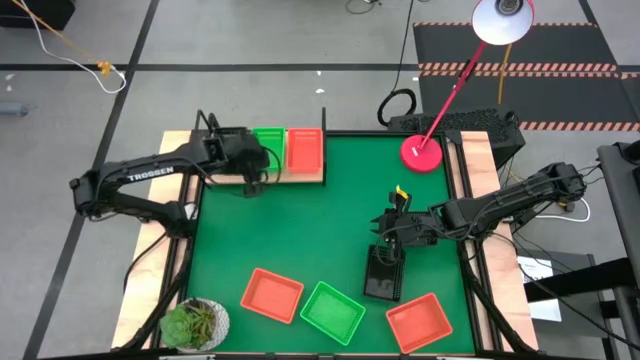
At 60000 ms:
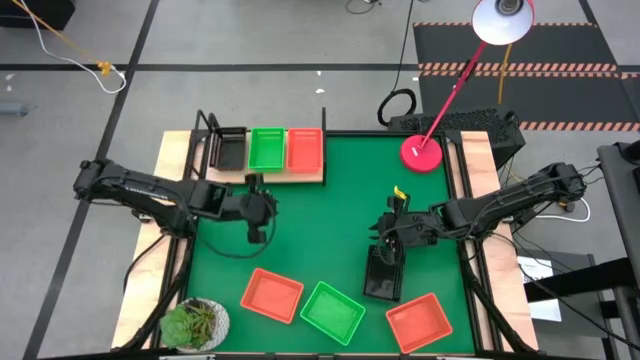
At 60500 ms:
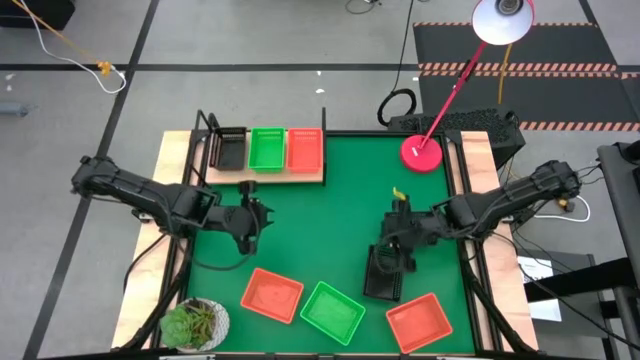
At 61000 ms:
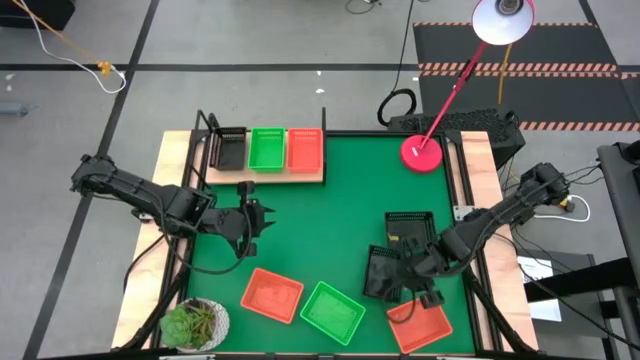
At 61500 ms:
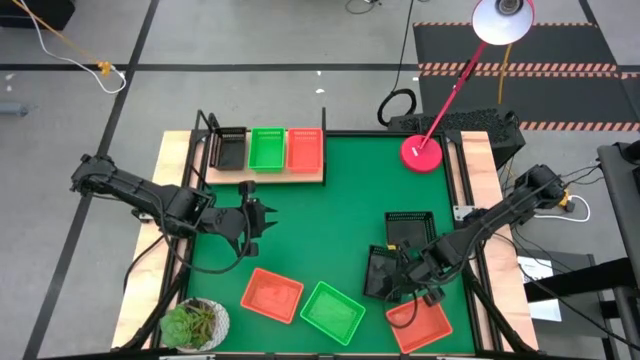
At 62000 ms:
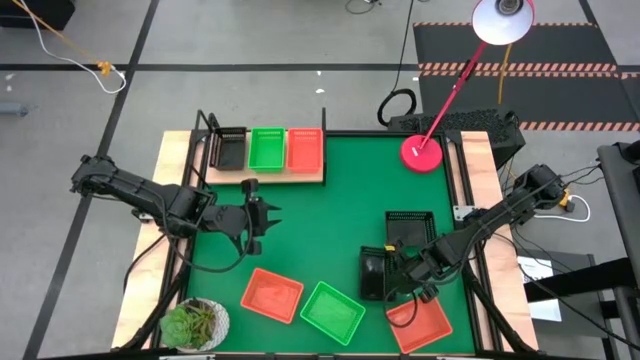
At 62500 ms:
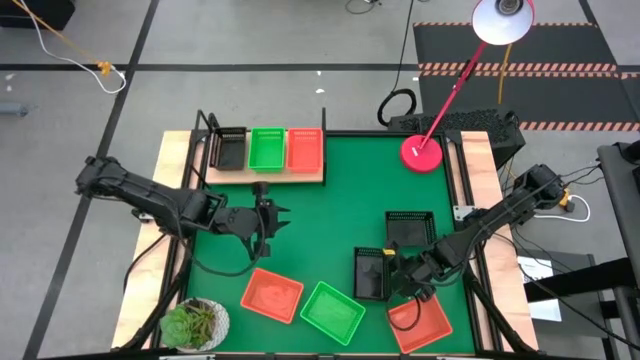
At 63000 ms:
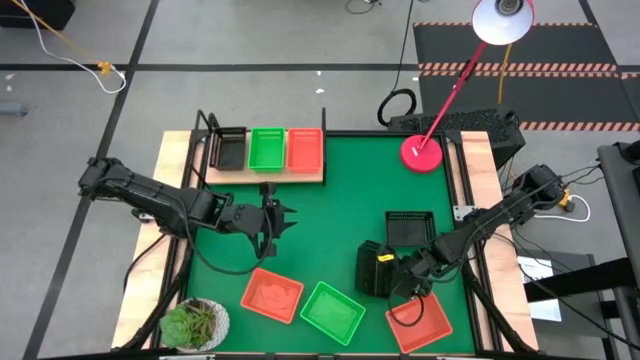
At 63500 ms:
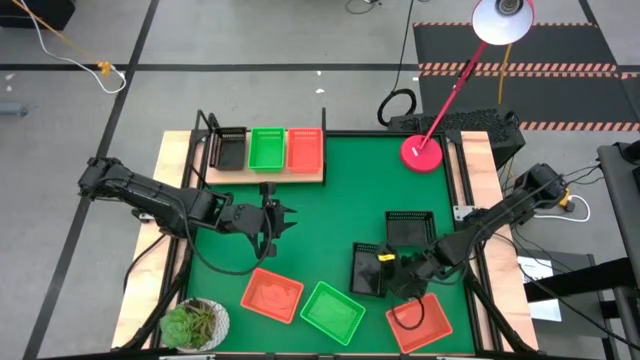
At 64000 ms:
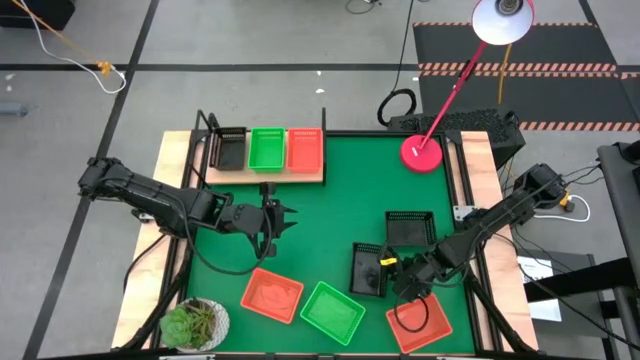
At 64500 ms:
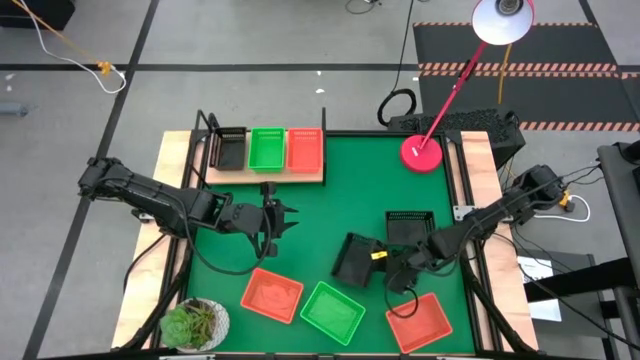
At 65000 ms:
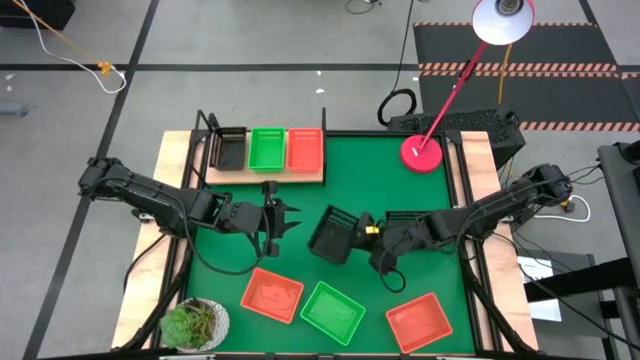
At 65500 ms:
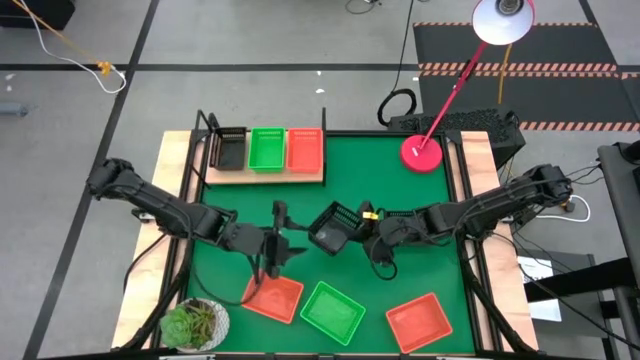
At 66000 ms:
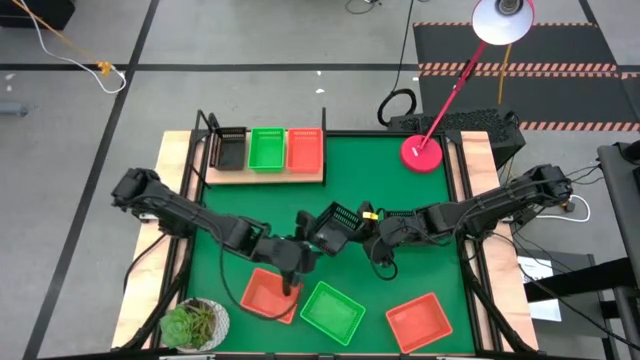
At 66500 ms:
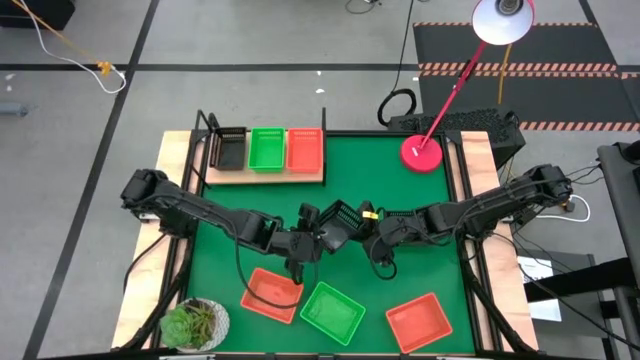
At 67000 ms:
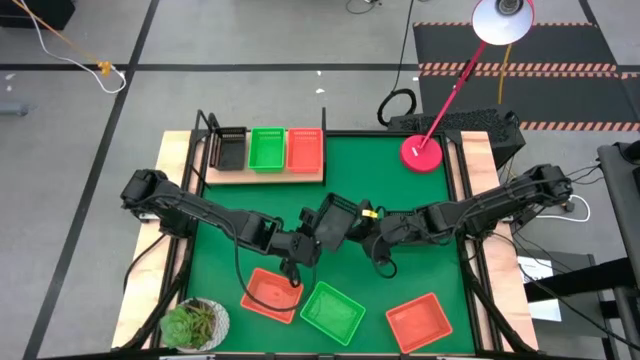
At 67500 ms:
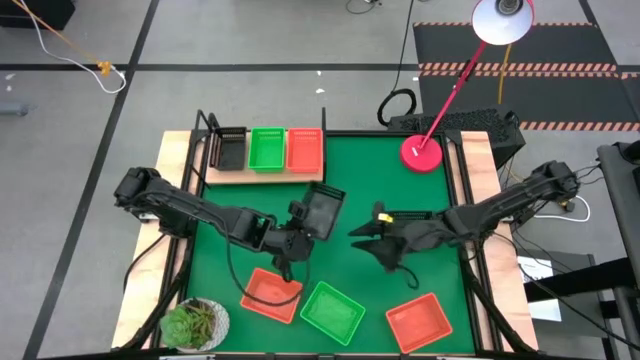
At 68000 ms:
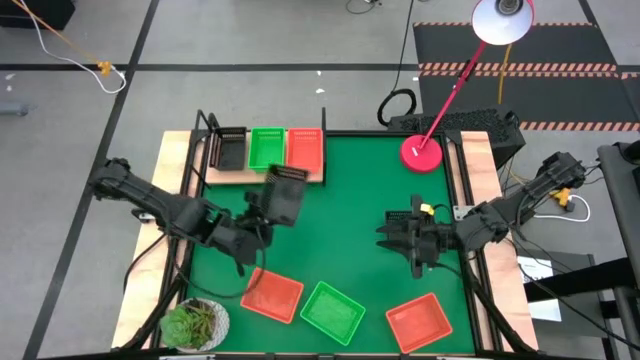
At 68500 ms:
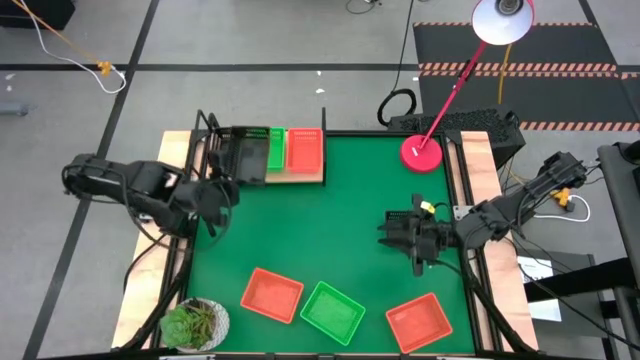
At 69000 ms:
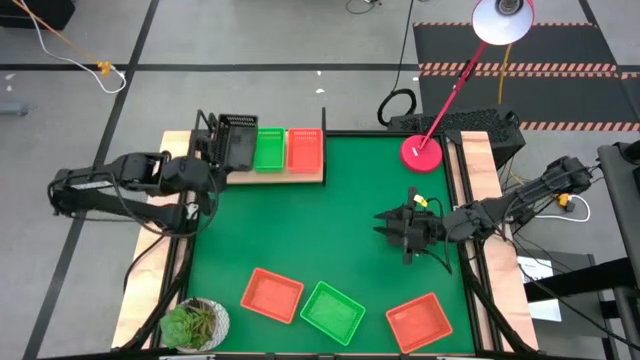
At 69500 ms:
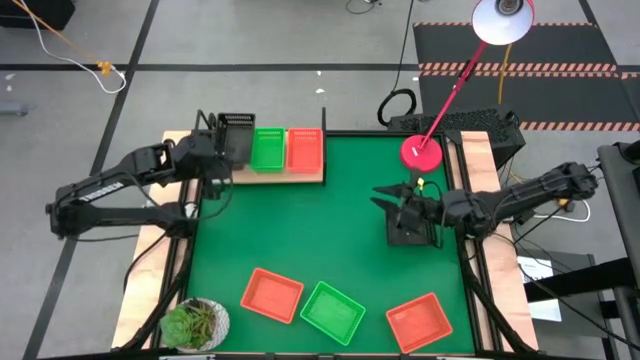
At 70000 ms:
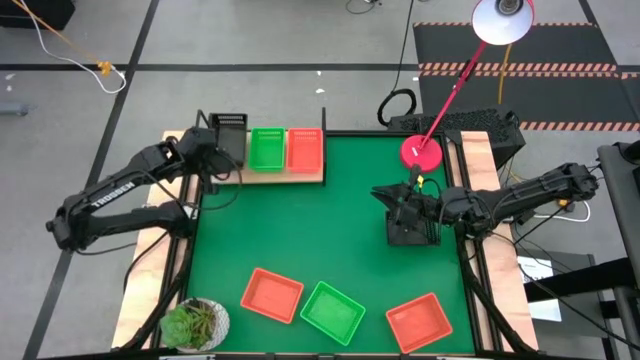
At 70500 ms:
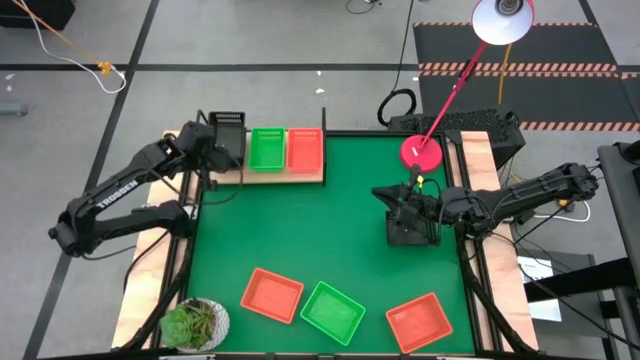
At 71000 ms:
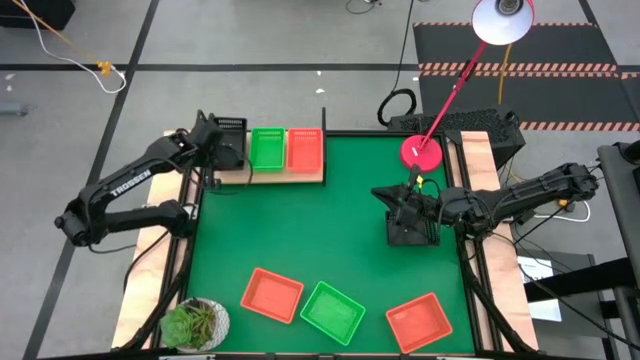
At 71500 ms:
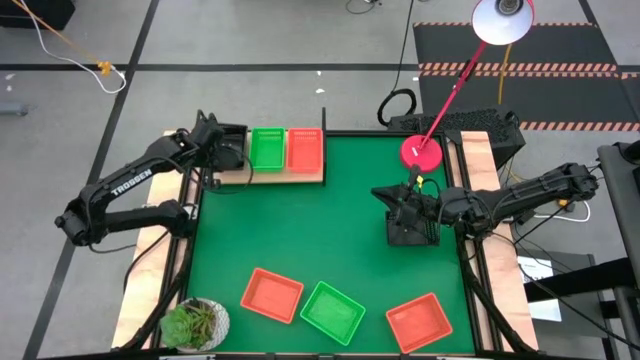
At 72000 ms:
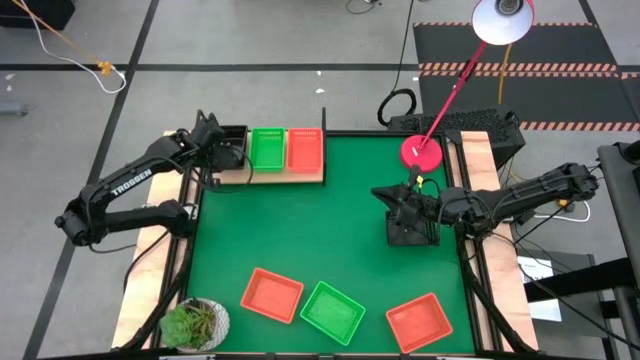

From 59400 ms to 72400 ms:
Task: Stack baskets on shelf by color
Stack the black bin on top of the black bin on the shelf

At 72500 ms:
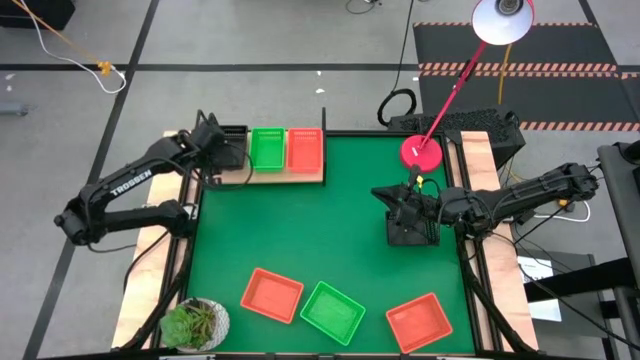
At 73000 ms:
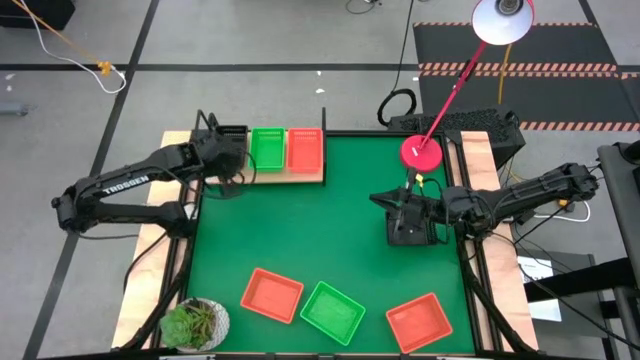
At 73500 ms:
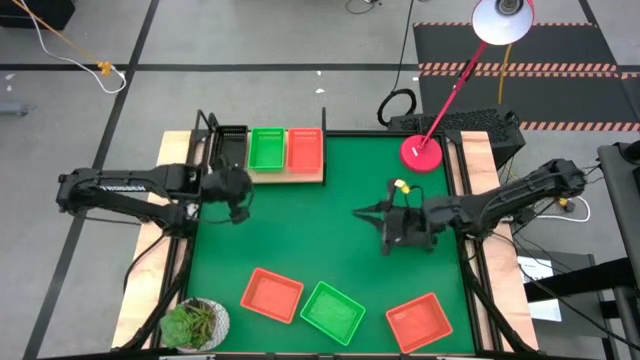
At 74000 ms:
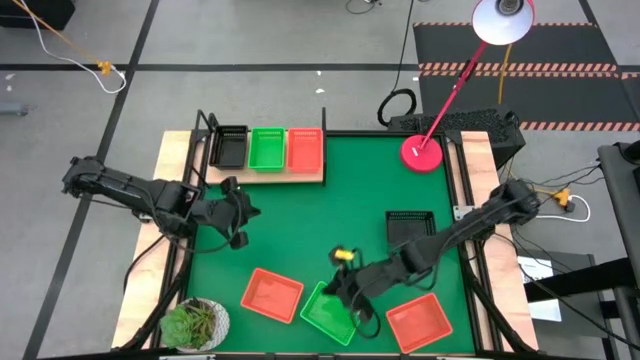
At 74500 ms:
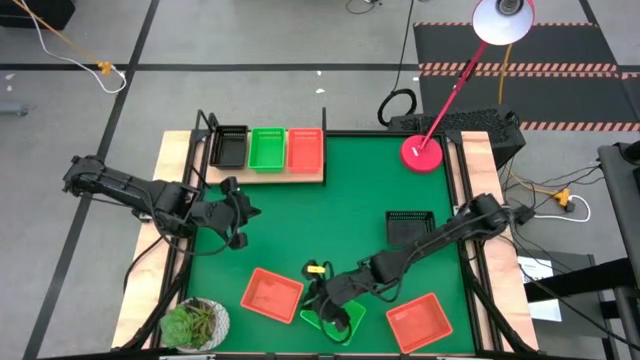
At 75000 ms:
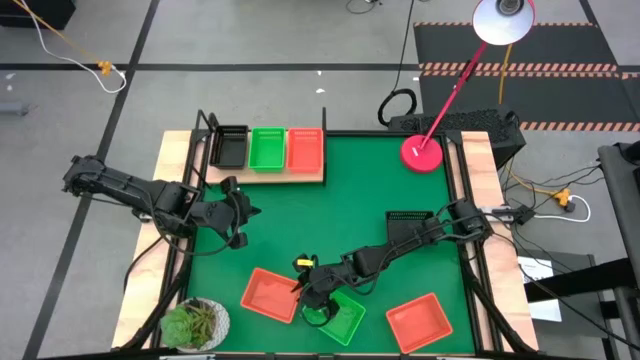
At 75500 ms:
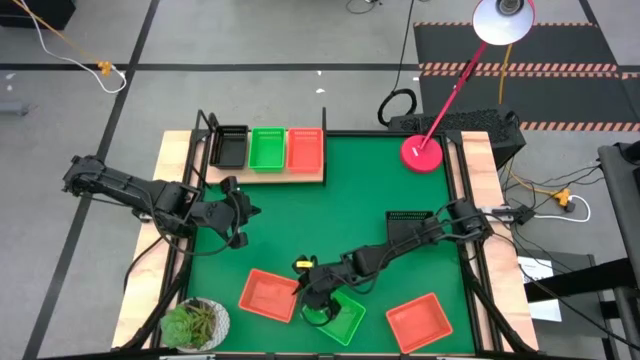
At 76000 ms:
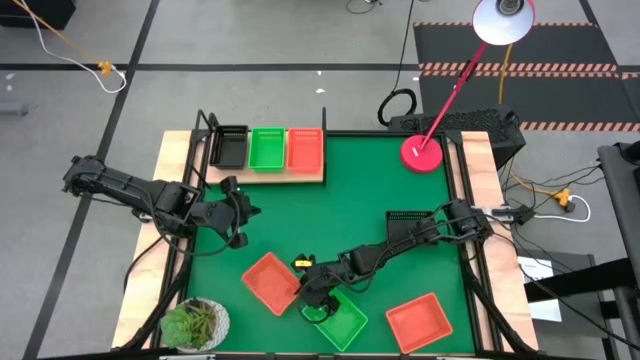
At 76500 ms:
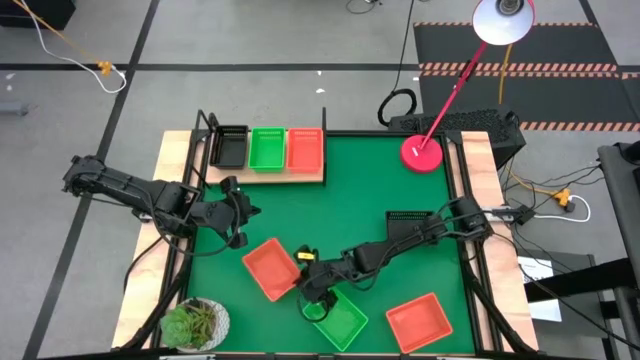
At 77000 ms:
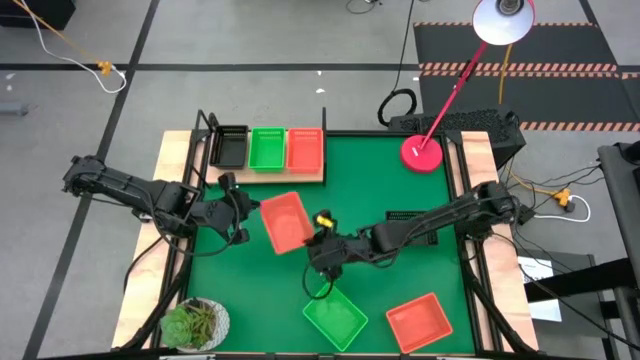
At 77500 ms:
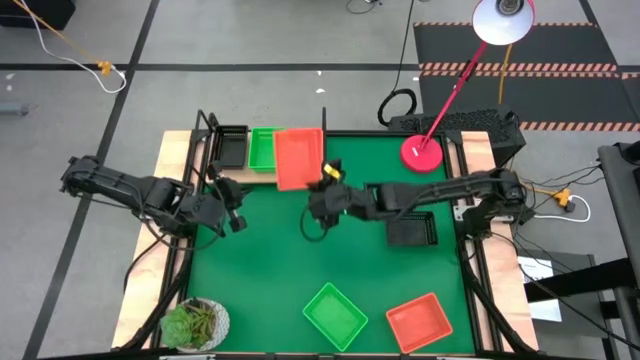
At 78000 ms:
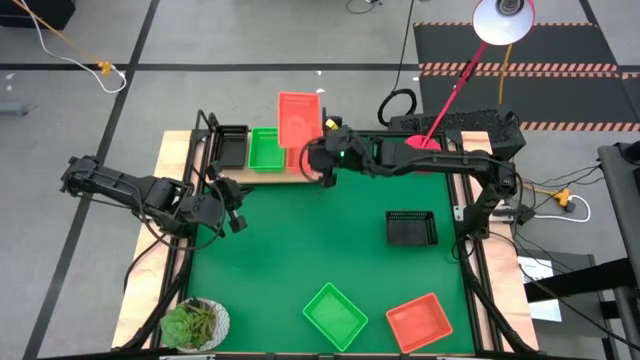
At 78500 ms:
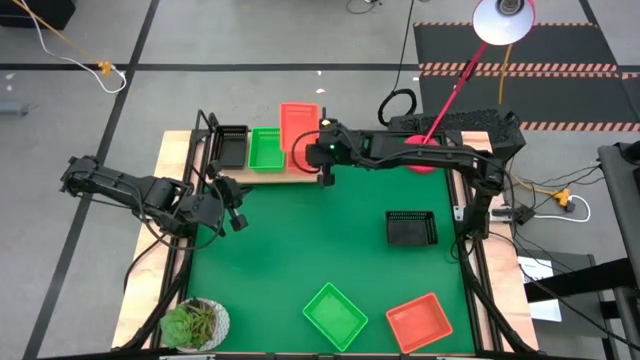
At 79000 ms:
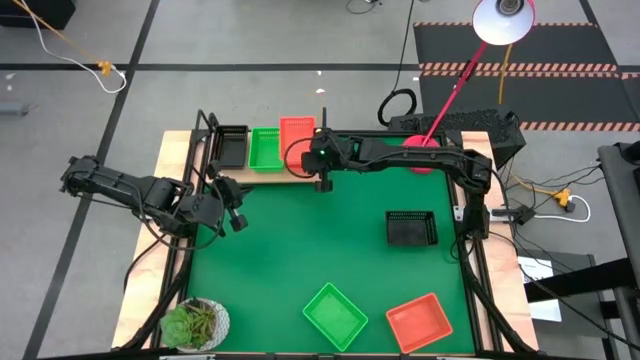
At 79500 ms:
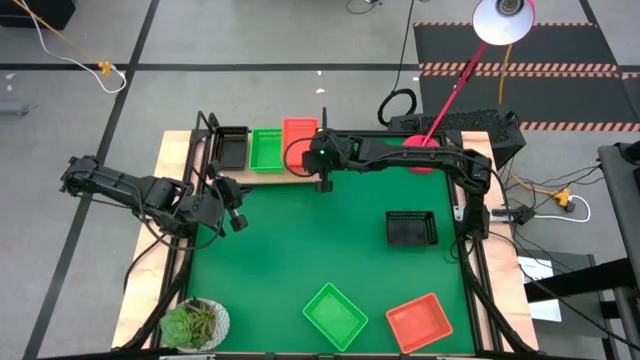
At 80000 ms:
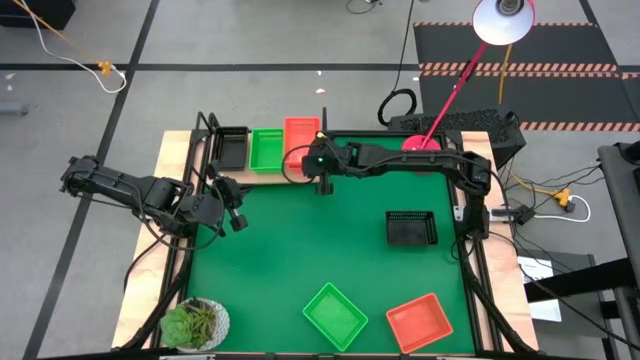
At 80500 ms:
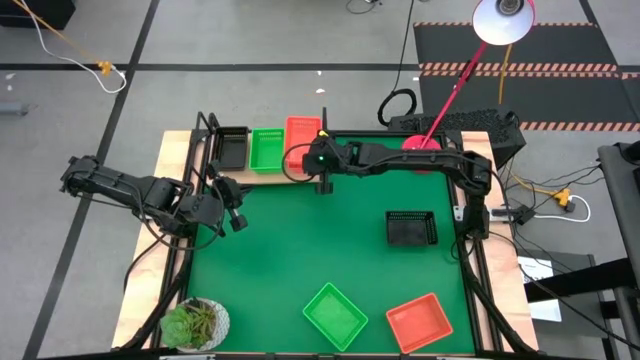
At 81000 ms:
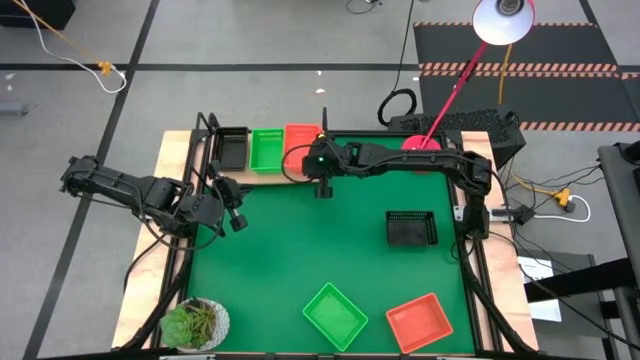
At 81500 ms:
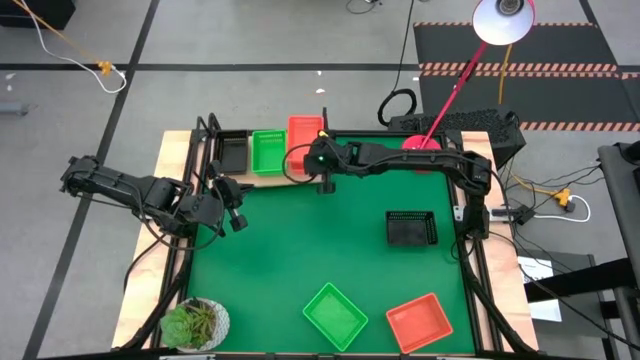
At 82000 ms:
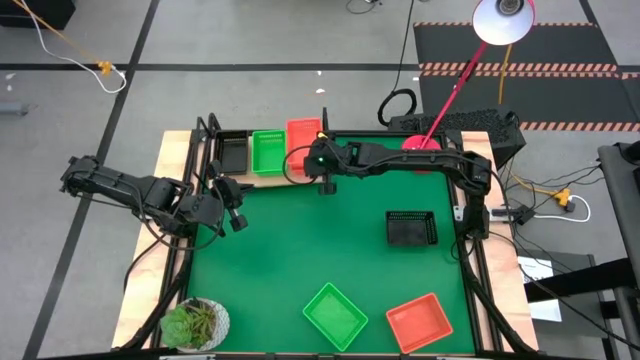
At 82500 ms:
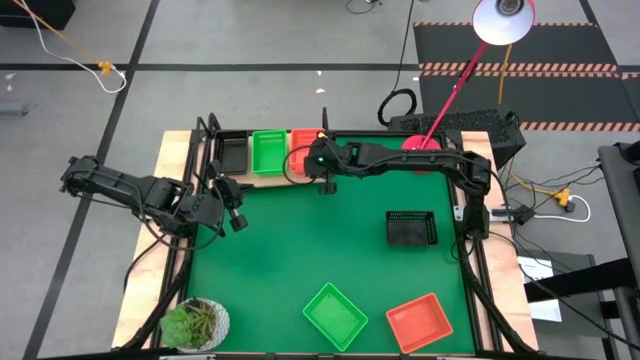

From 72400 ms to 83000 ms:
Stack the orange bin on top of the orange bin on the shelf
